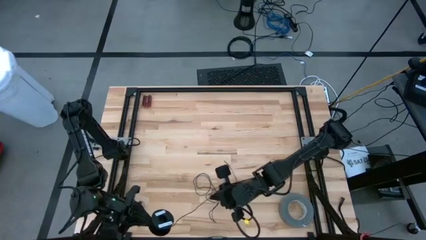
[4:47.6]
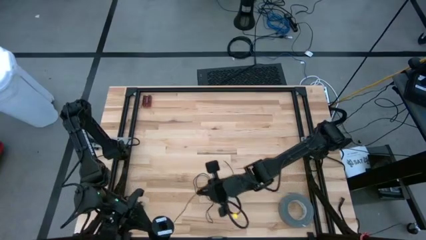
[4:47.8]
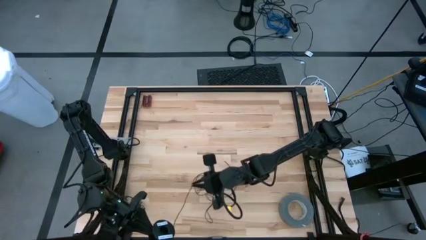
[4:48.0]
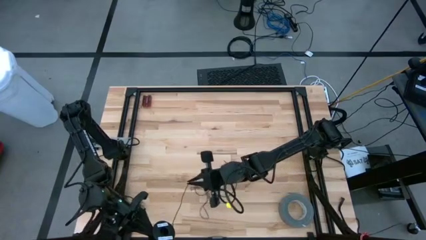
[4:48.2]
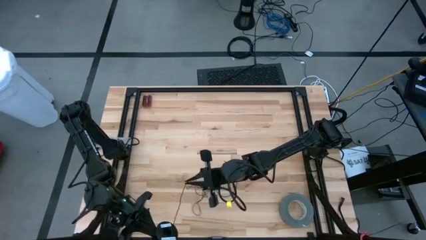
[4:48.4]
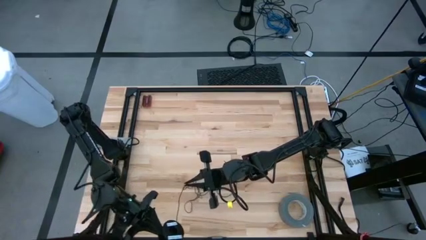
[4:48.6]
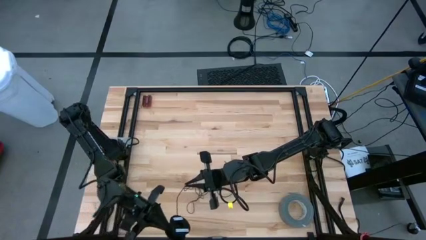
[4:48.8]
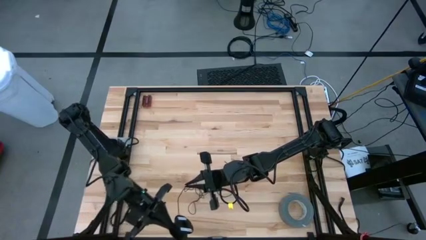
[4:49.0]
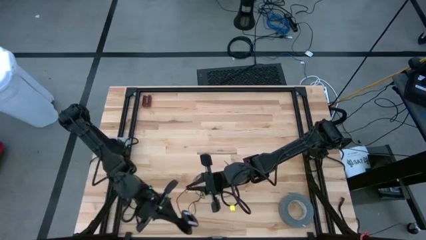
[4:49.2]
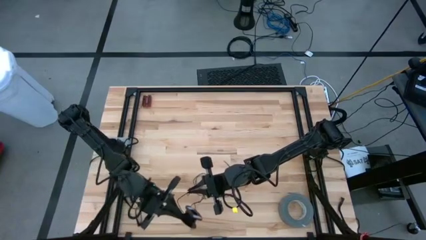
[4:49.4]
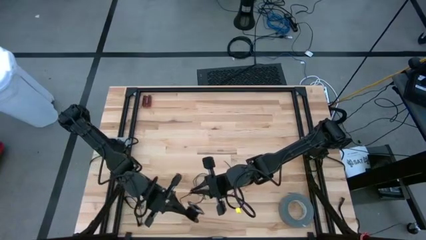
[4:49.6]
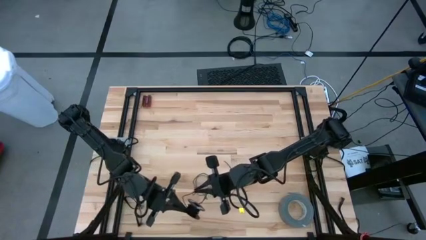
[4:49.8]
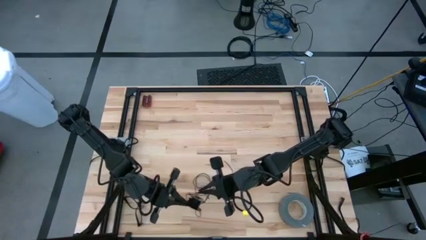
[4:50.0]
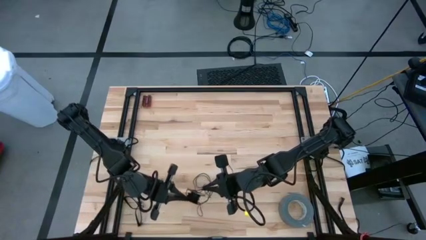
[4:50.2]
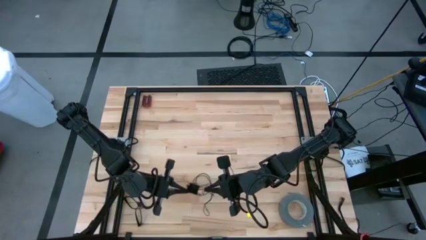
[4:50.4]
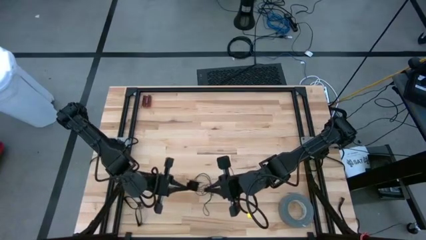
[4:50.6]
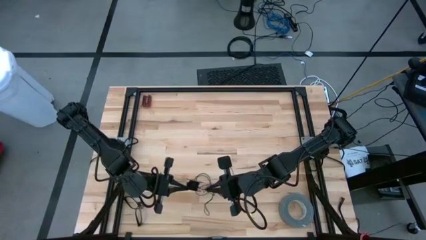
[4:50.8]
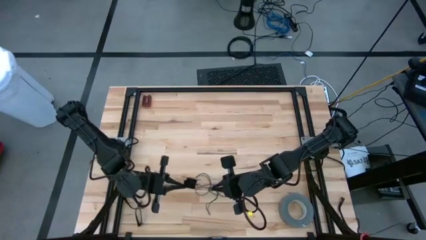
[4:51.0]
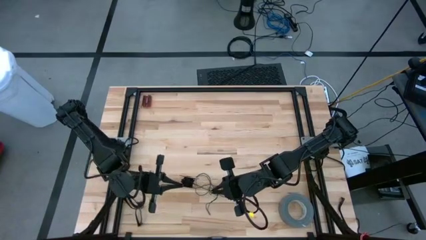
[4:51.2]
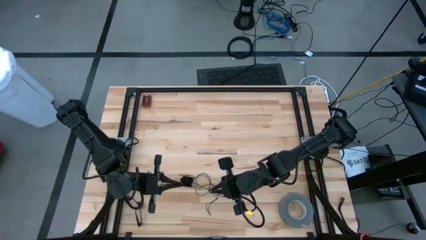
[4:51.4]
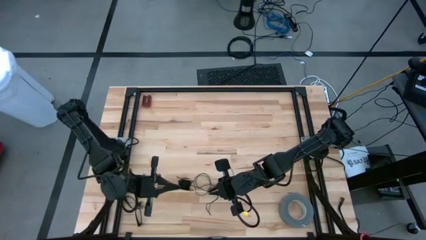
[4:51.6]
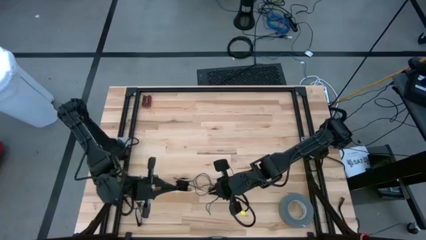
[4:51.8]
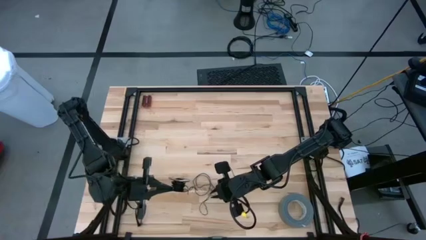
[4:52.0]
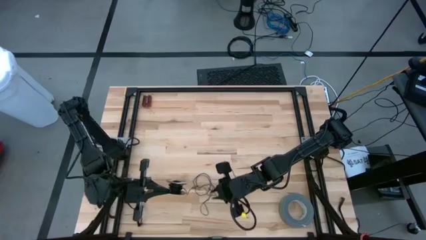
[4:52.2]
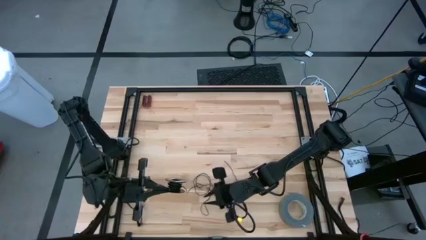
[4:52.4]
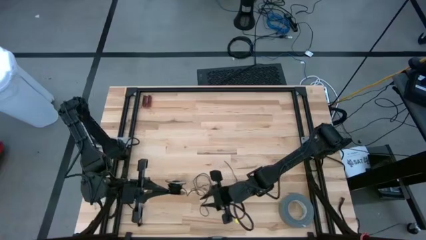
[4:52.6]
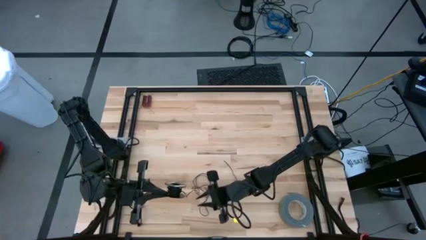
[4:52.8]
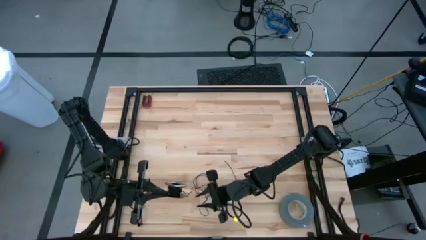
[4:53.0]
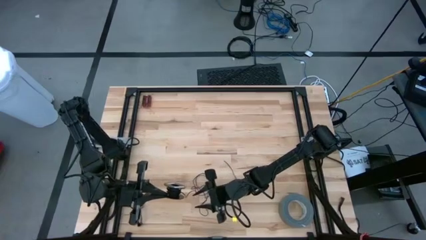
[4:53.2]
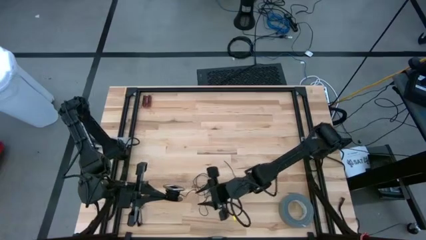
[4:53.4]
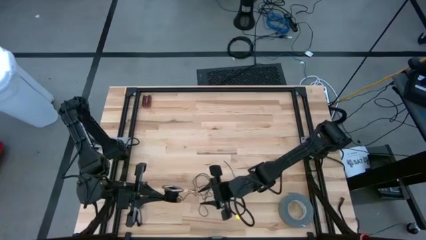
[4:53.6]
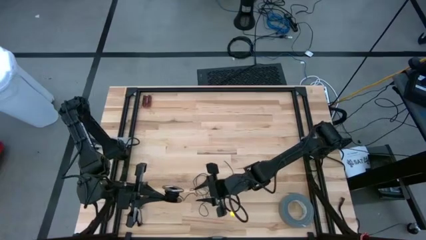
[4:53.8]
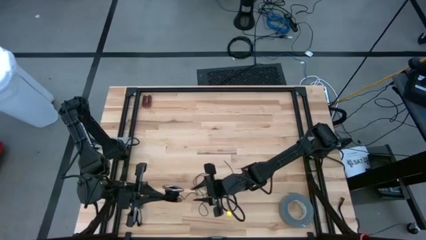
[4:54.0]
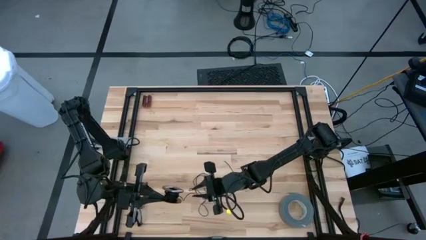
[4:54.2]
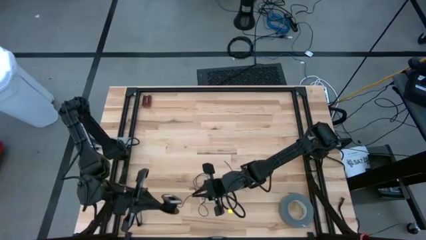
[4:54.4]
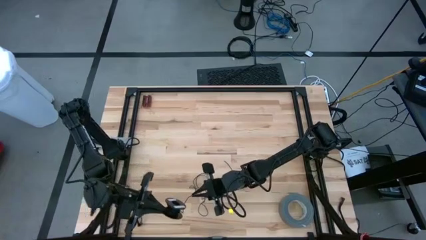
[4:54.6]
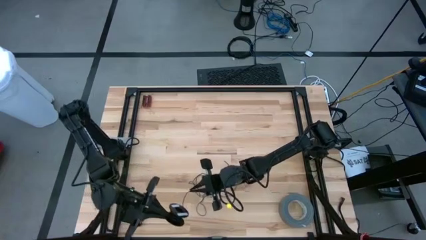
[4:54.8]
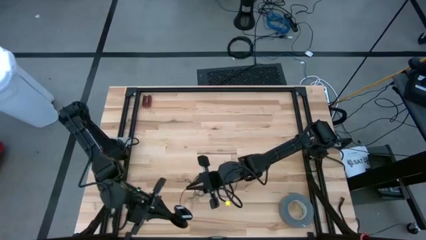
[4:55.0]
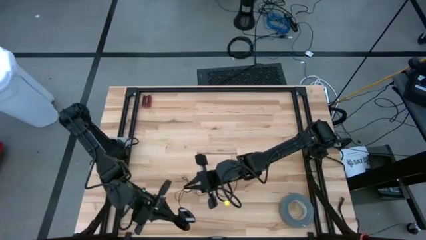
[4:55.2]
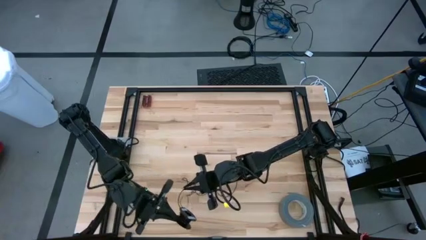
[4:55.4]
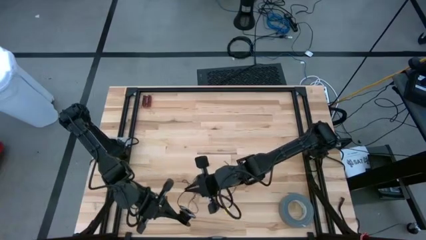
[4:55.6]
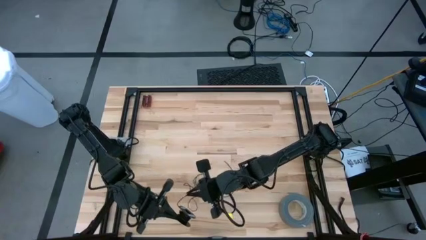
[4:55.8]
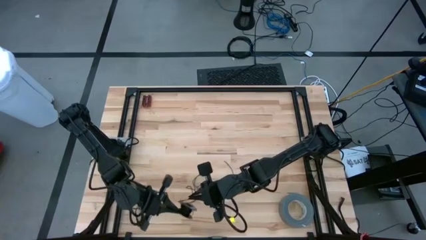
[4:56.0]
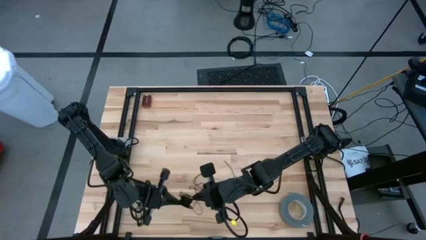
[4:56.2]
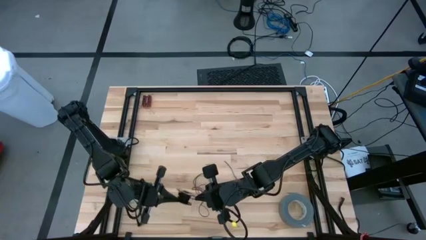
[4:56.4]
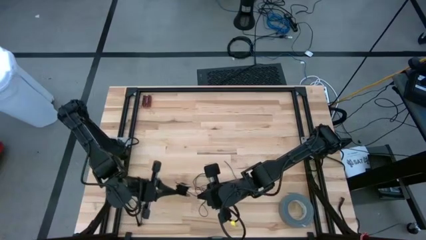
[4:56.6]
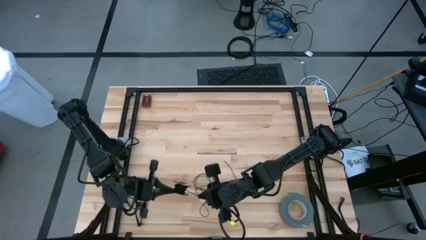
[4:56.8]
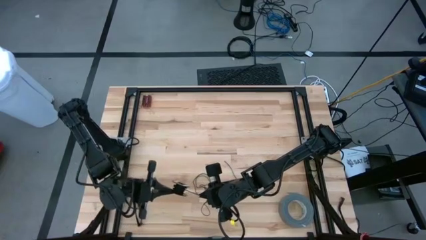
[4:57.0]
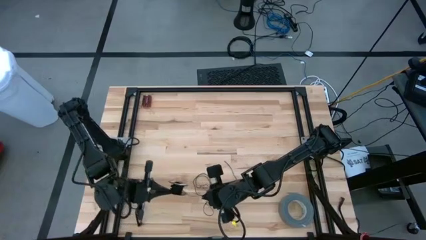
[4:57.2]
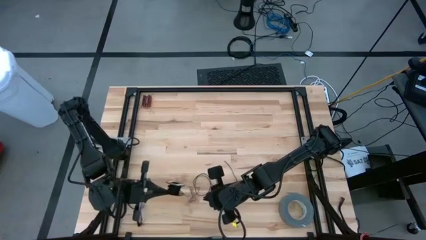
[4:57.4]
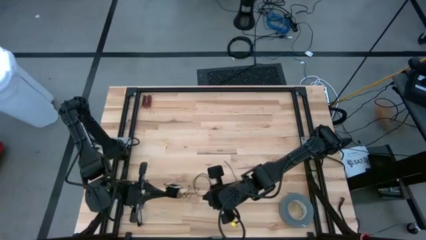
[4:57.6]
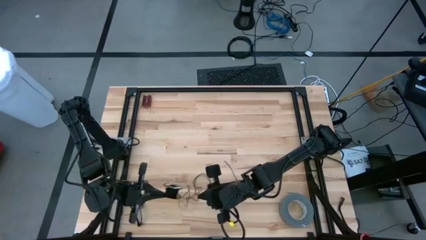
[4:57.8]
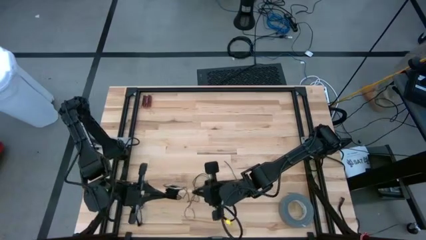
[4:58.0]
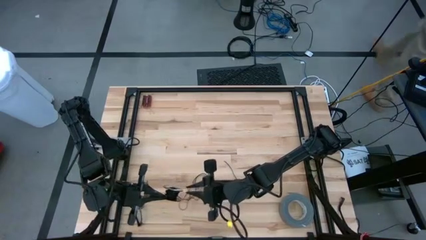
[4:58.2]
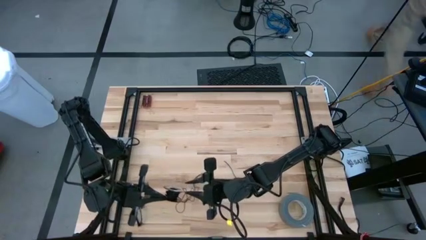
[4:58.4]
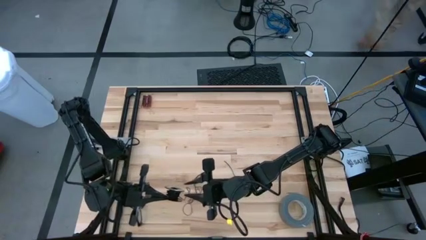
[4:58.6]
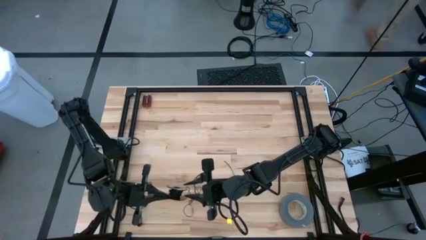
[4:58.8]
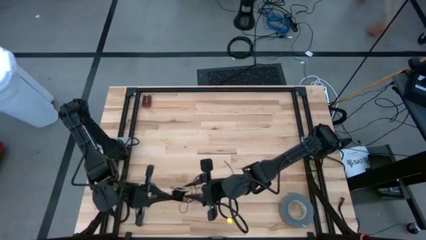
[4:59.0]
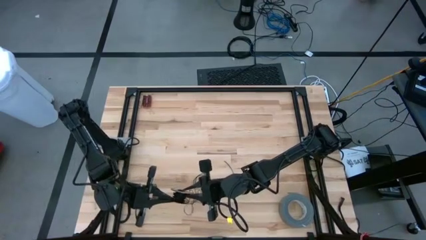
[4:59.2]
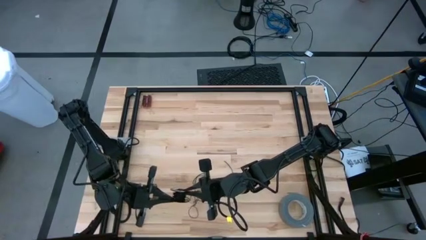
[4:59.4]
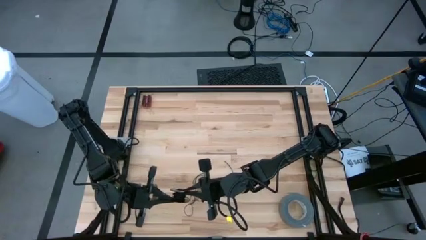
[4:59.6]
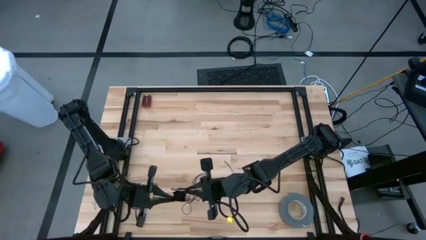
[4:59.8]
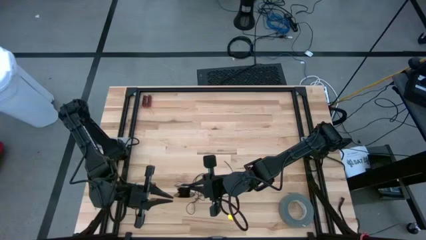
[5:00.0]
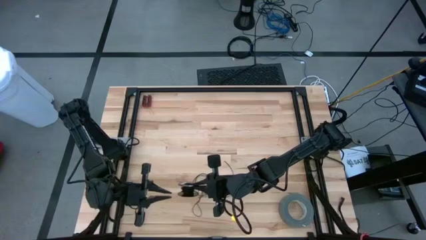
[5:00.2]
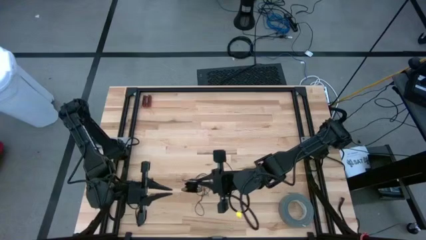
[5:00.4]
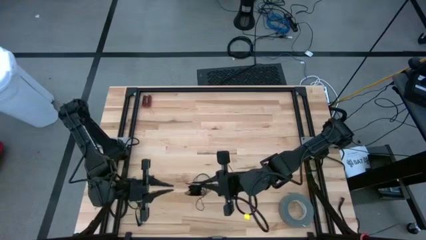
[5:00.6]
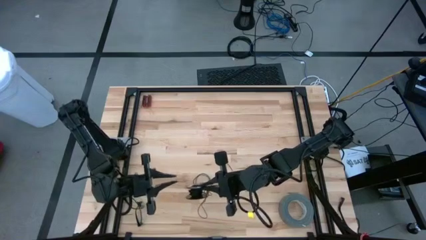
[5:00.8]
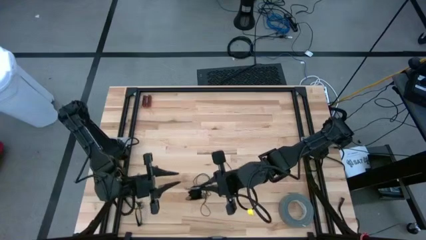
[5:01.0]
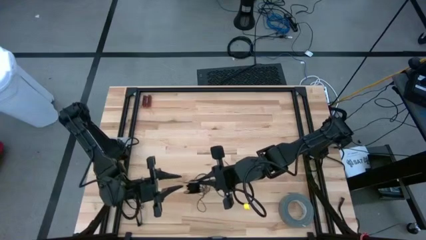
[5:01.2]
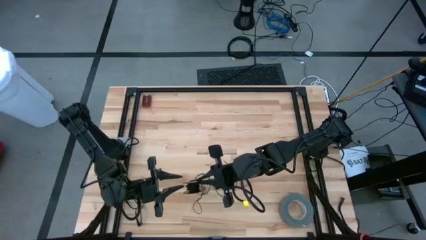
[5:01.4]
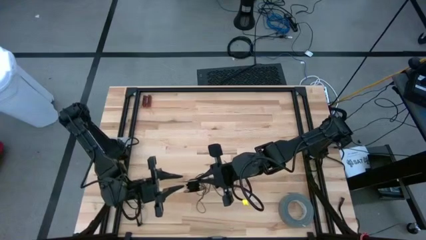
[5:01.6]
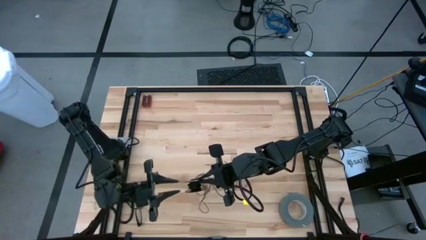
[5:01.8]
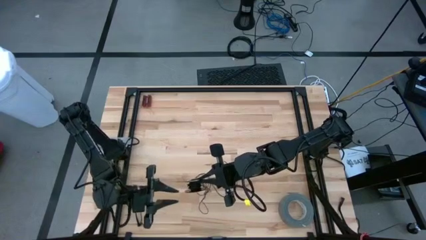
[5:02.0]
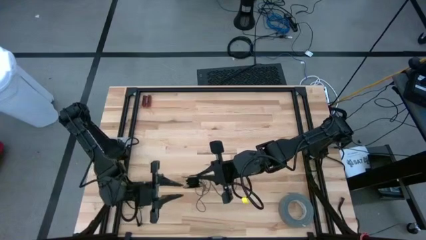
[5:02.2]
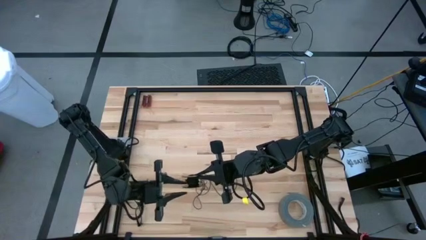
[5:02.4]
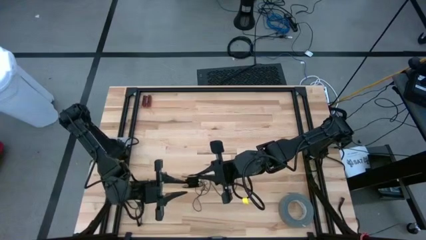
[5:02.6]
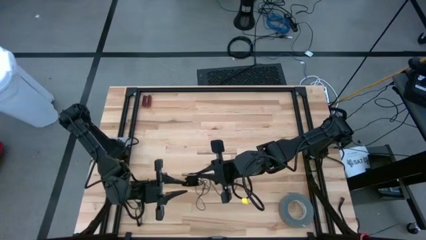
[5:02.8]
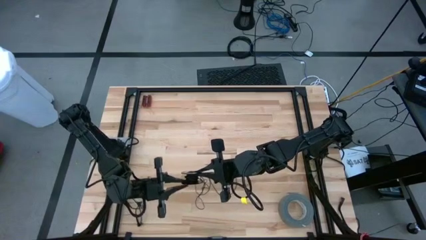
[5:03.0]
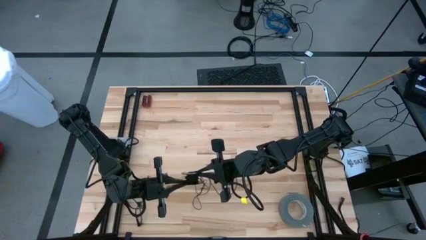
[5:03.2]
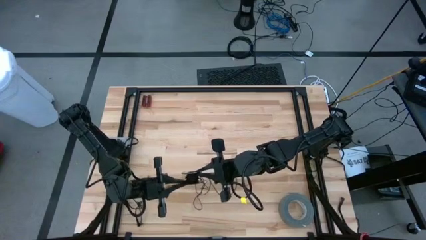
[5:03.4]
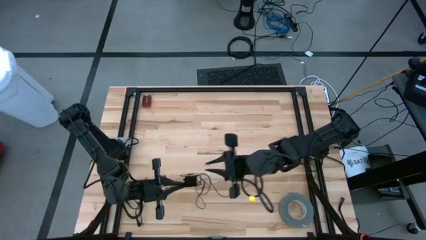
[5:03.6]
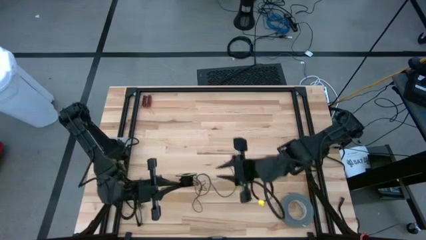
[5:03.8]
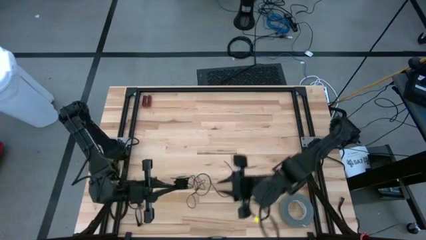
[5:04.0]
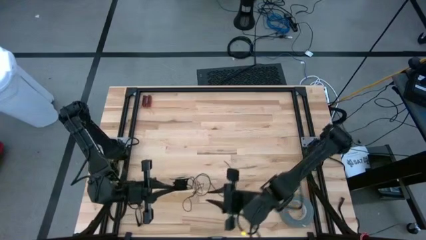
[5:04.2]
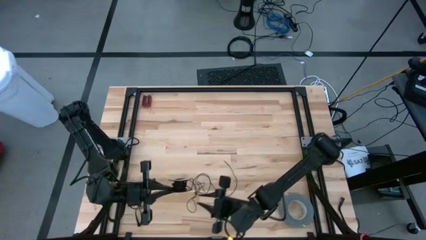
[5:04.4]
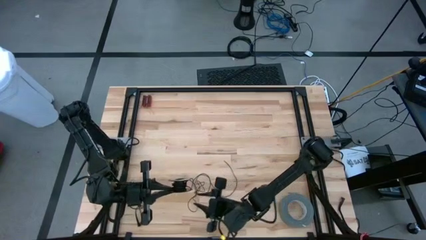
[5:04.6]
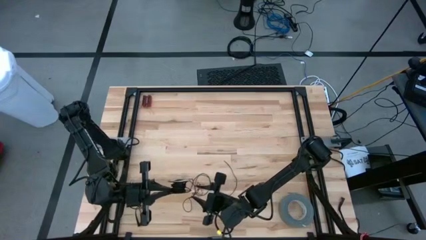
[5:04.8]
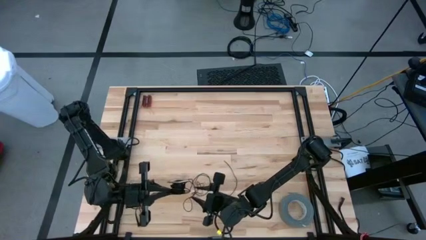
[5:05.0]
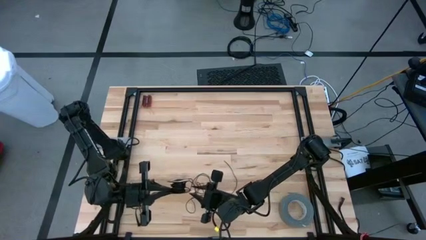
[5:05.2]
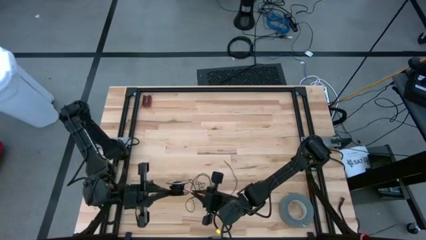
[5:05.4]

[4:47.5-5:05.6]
Task: Coil cords
Coil the black wire on the spool
